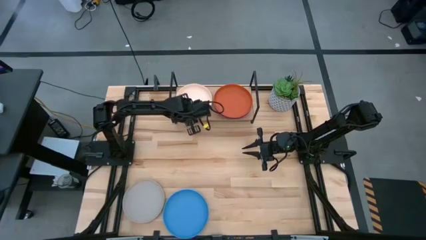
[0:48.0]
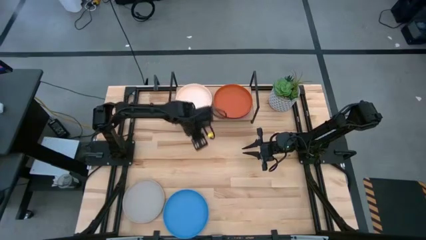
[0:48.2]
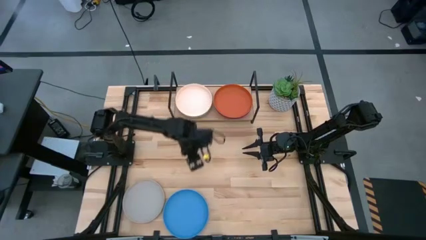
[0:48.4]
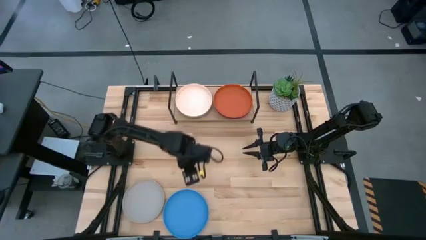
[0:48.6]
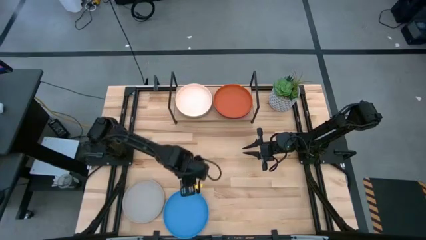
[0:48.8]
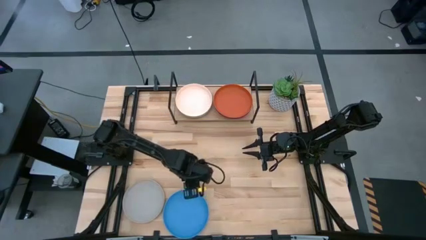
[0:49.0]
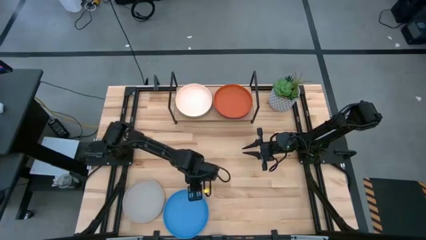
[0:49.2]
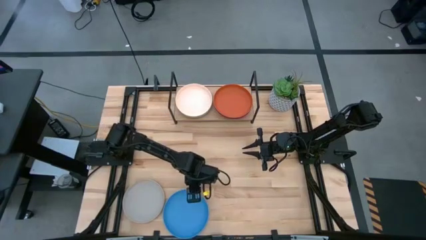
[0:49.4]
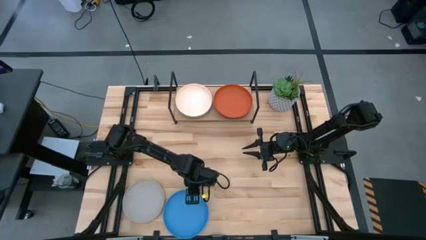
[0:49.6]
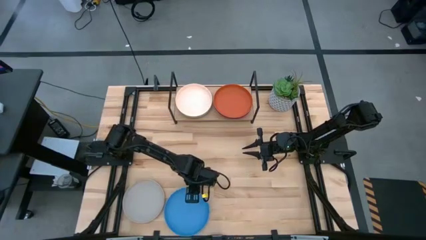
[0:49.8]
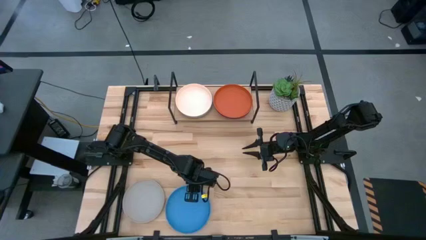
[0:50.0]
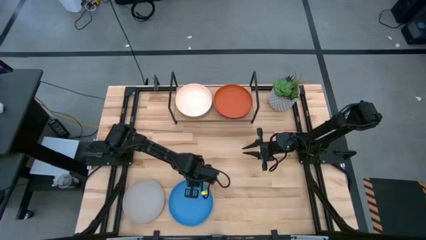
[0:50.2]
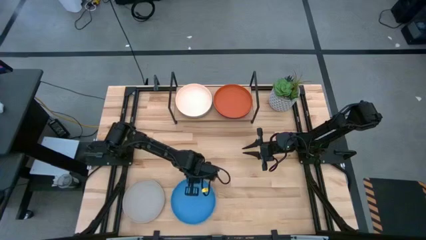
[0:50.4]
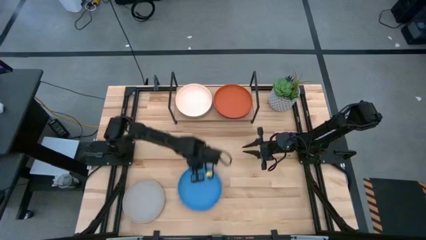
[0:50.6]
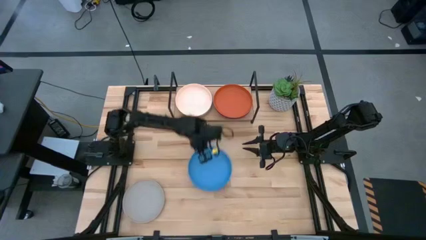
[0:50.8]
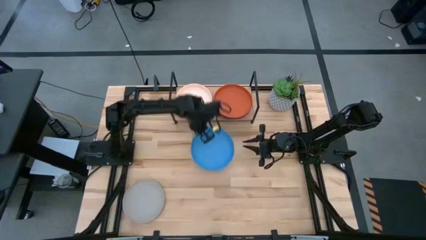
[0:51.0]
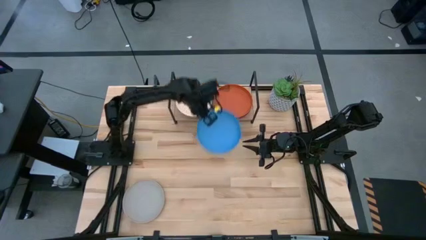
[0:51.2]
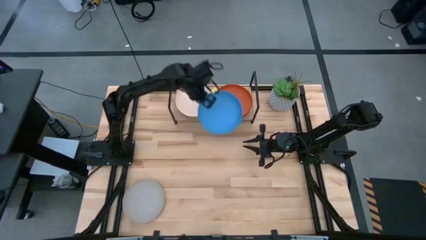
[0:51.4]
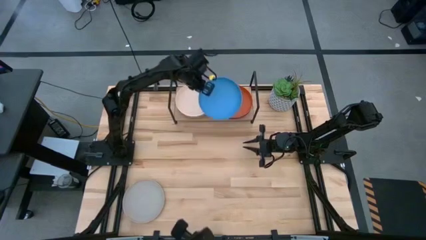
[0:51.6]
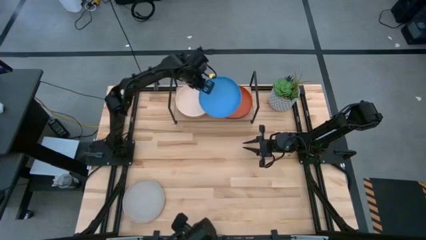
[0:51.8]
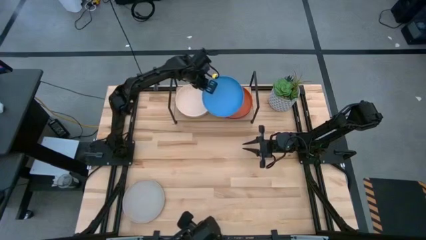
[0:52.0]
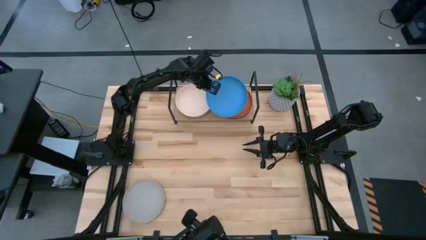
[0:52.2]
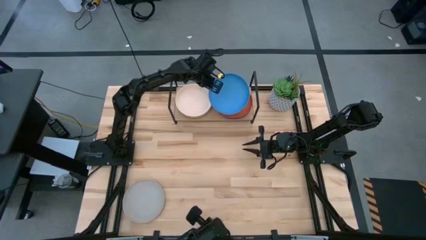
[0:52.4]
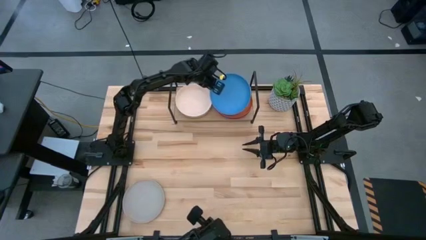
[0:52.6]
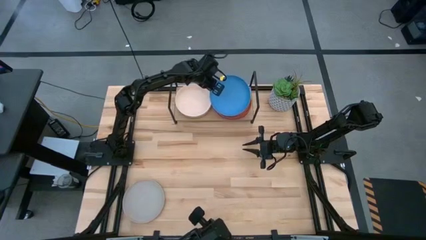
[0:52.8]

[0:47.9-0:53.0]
Task: Place and stack plates onto a shelf
Stack the blue plate on top of the orange plate on the shelf

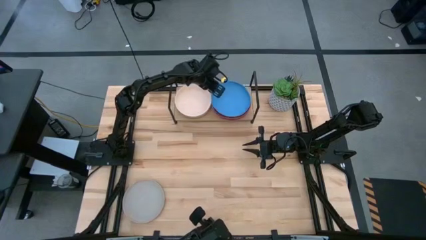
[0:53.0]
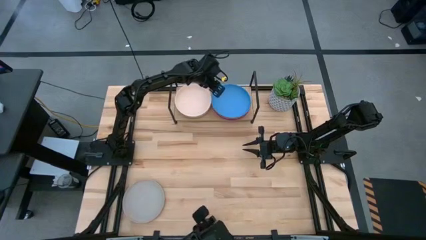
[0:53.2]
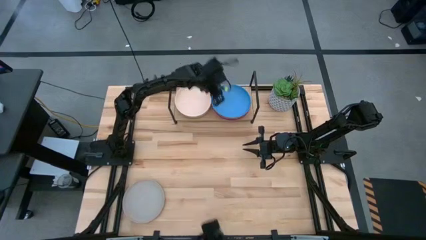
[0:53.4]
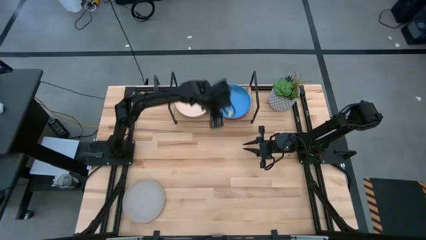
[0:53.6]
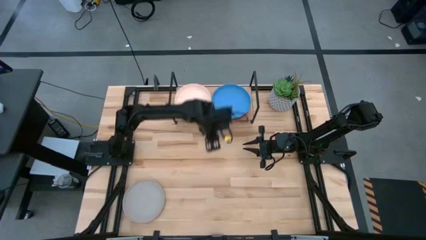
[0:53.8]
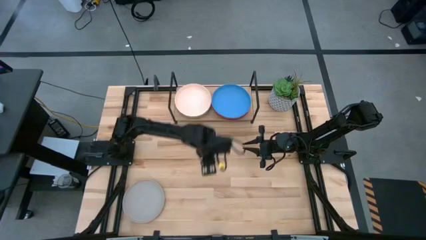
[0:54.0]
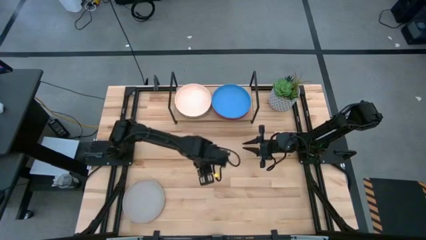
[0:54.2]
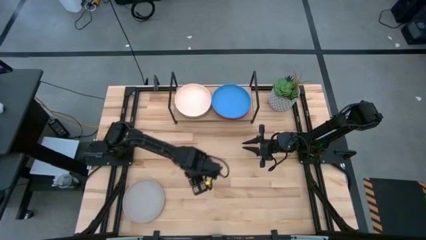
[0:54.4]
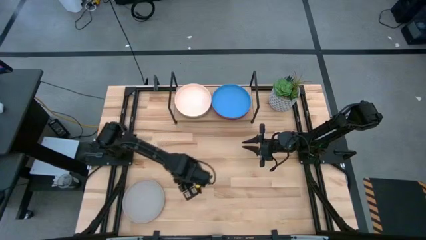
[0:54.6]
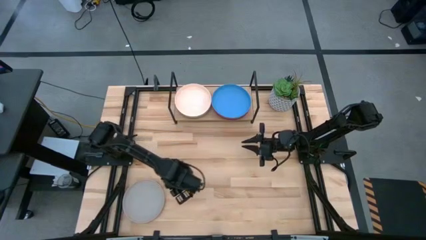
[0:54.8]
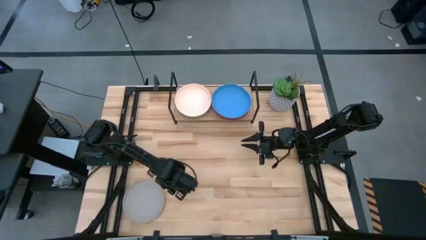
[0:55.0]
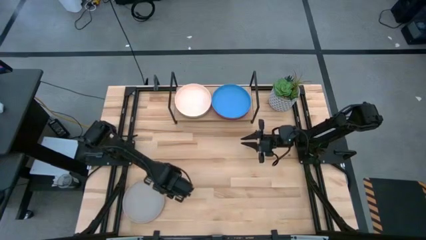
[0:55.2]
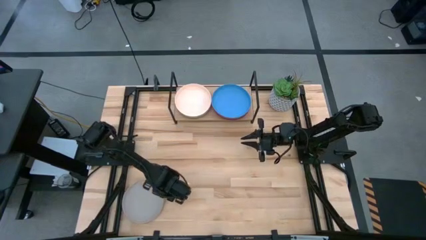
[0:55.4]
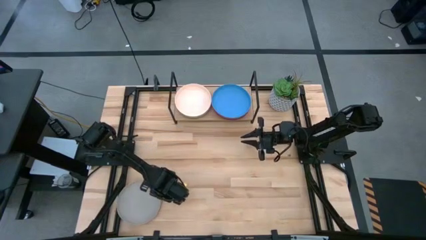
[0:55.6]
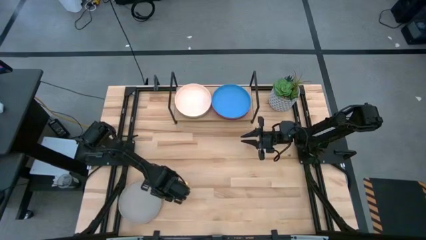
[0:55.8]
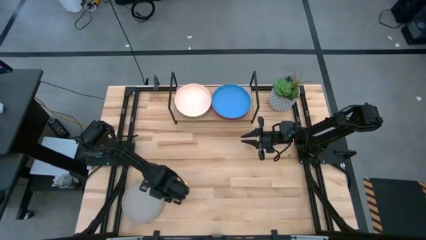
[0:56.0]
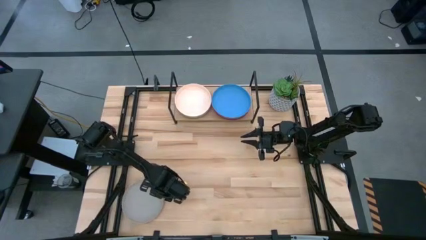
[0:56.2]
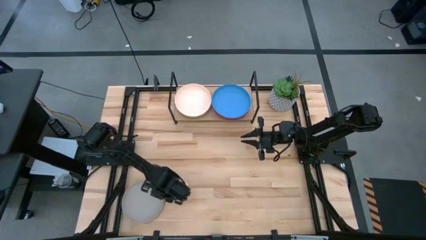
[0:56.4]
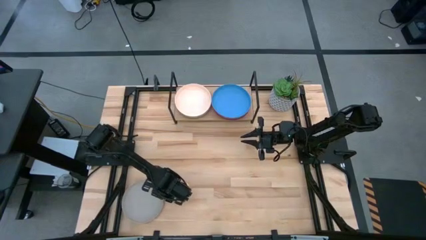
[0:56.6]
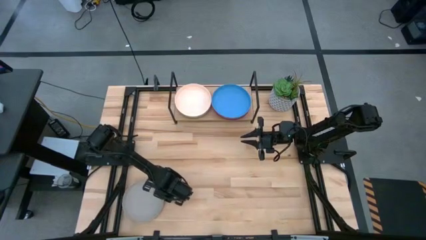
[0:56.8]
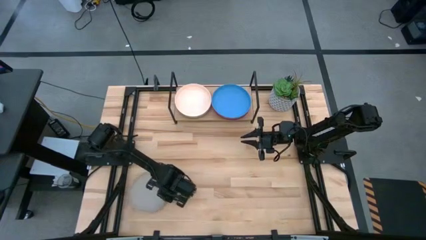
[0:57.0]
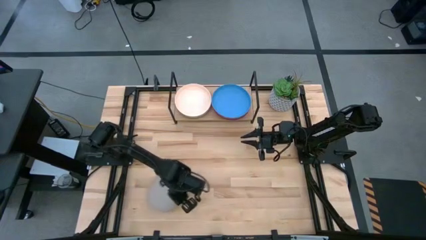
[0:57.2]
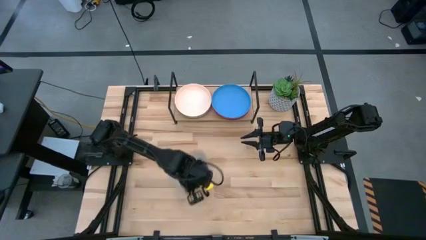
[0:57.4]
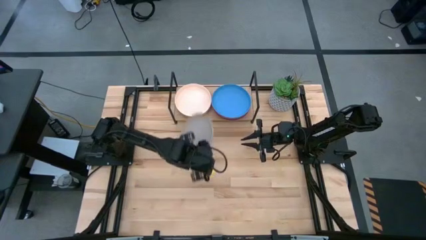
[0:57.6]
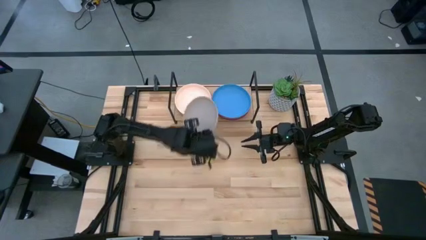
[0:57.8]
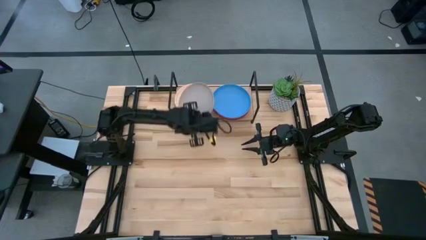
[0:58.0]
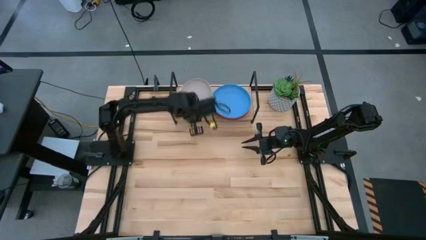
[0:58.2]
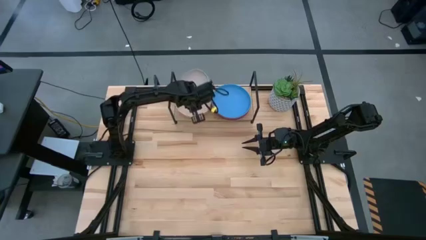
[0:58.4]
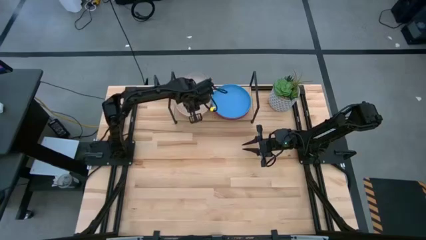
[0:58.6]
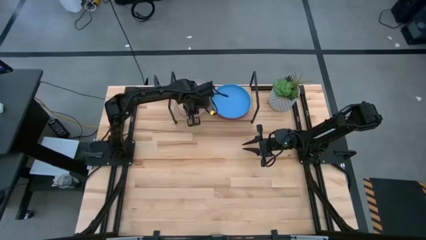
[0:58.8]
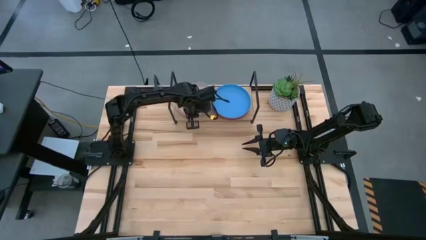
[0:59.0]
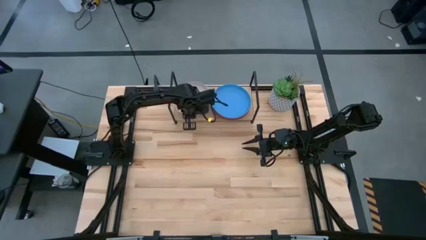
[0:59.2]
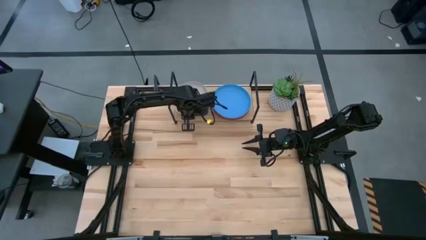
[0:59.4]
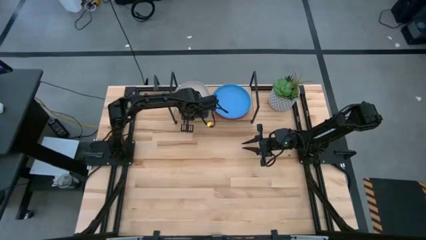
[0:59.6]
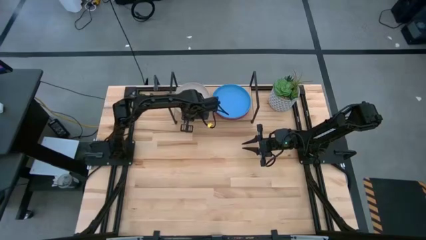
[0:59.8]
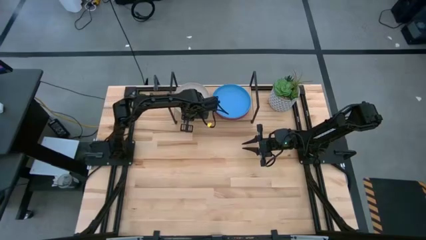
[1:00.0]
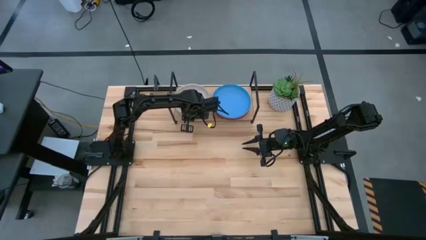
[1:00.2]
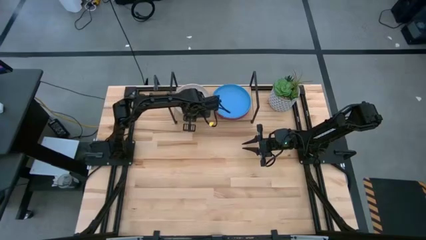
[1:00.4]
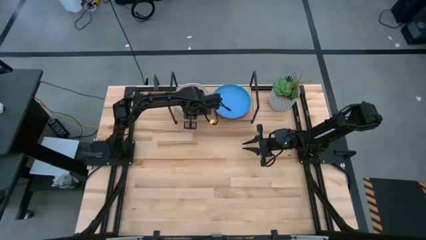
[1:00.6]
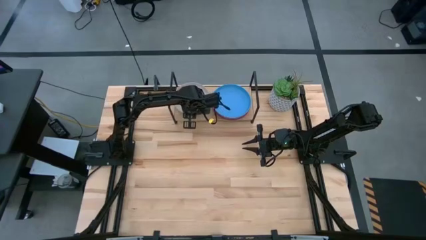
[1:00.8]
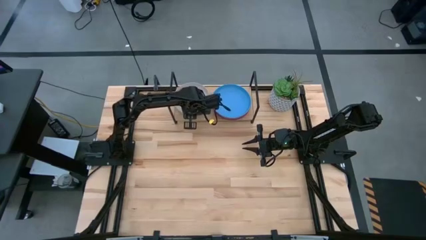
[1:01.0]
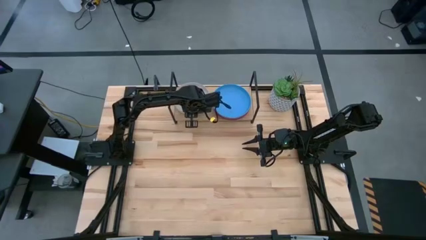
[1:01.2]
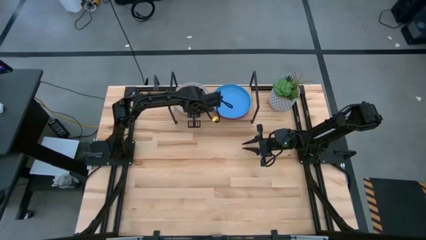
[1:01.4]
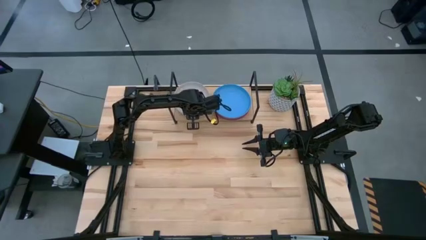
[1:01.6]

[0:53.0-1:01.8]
Stack the gray plate on top of the light orange plate on the shelf

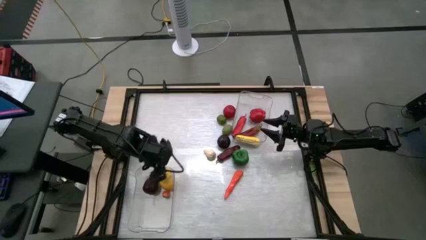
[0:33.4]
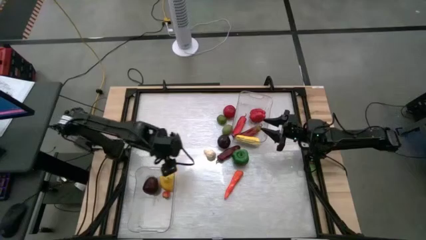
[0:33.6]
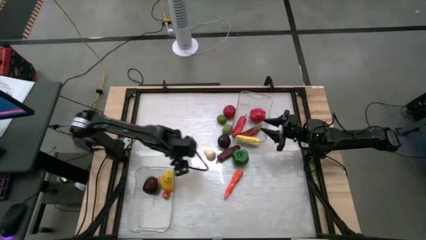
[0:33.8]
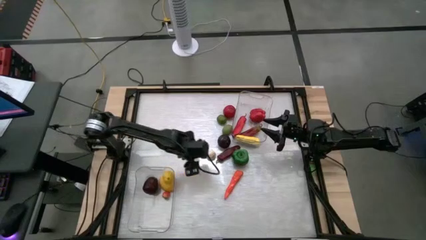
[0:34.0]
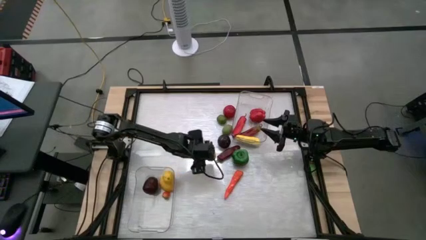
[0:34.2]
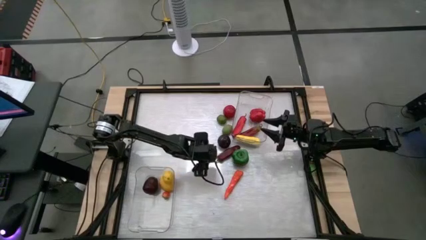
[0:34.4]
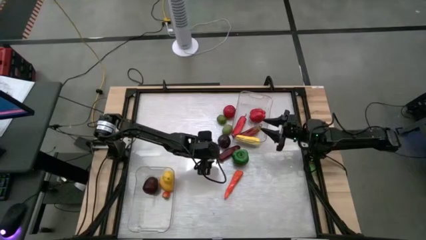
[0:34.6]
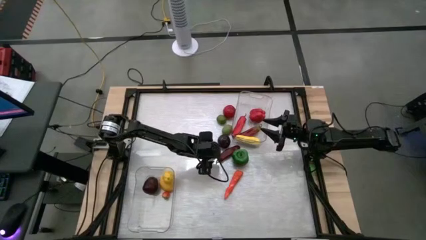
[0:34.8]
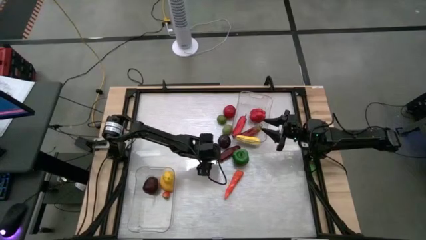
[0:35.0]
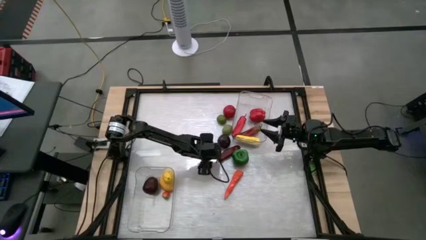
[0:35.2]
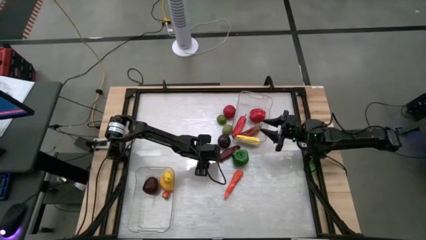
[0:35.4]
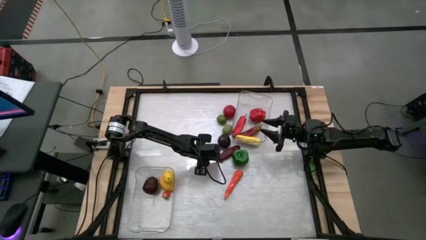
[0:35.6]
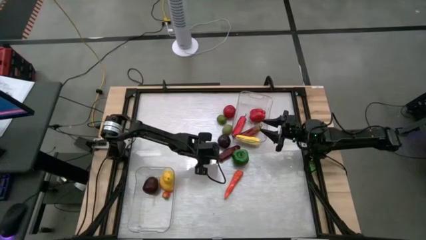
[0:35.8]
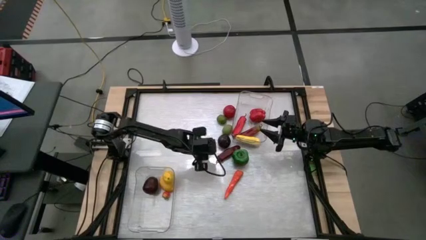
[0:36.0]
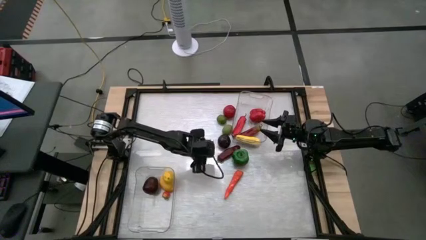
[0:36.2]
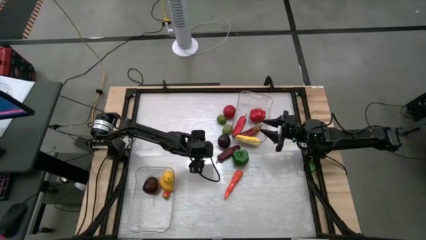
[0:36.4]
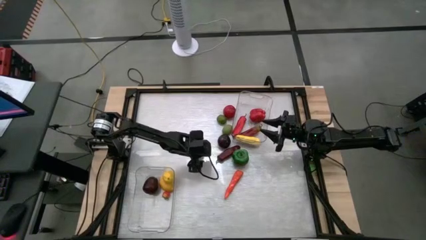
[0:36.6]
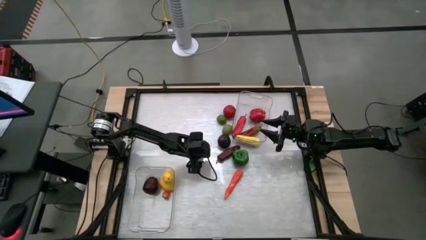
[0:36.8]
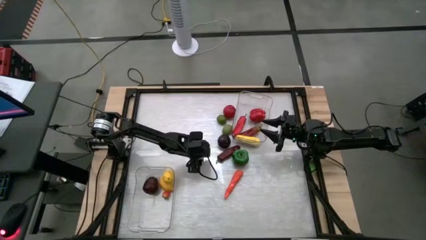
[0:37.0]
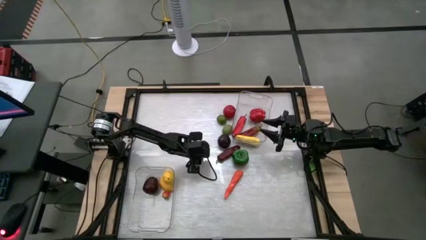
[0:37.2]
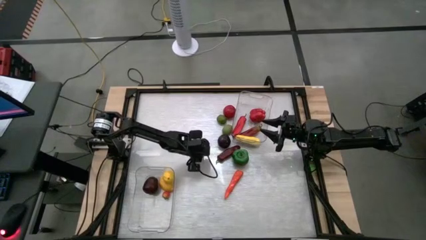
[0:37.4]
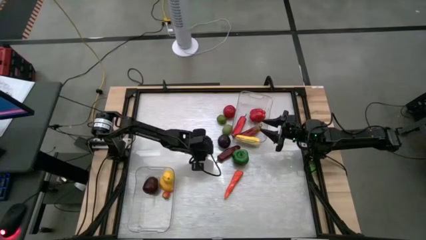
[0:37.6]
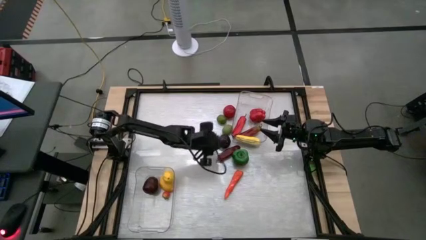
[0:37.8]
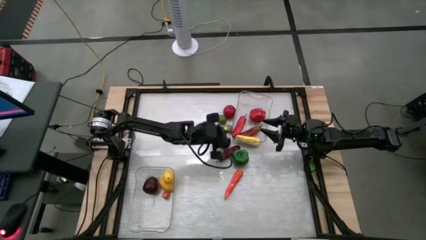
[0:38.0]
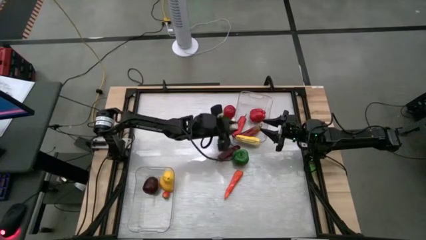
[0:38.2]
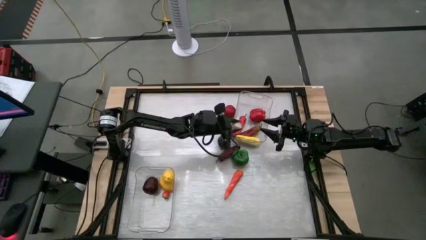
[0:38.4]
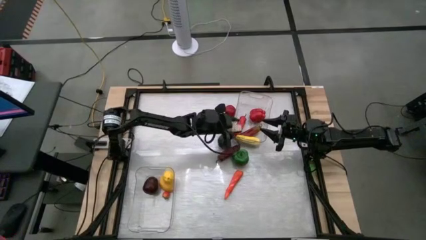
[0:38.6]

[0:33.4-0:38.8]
Task: Sort produce into baskets
Put the white garlic into the top transparent bin
